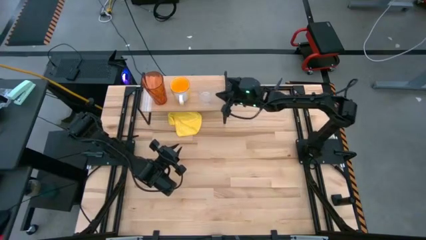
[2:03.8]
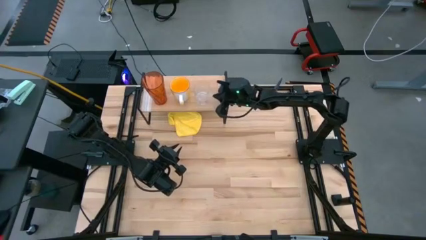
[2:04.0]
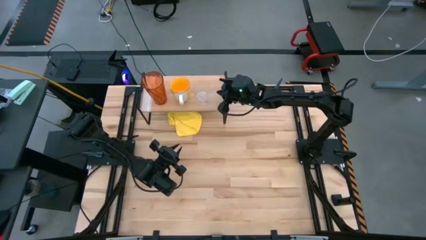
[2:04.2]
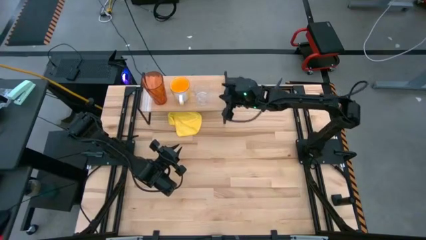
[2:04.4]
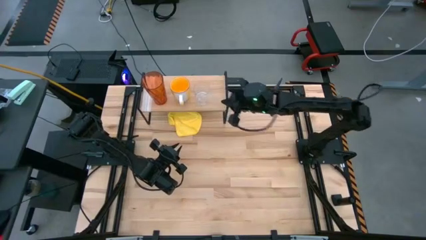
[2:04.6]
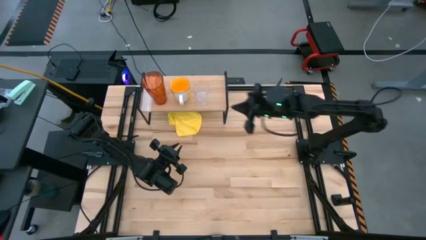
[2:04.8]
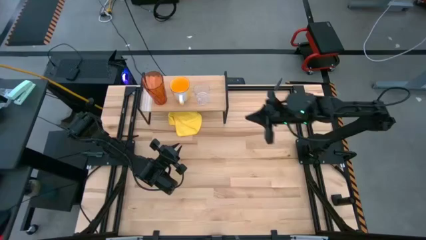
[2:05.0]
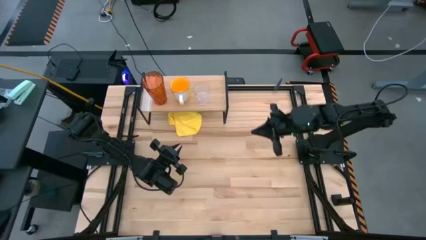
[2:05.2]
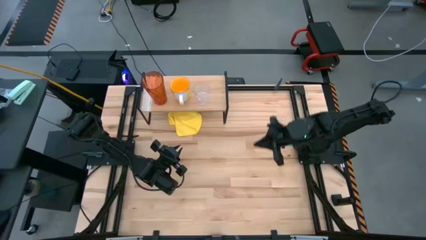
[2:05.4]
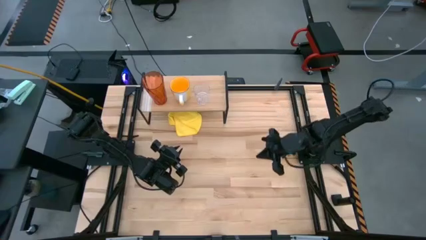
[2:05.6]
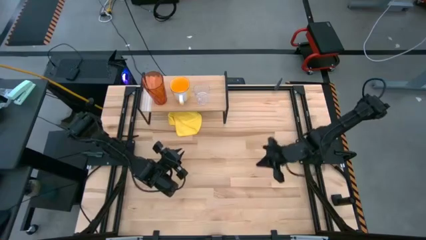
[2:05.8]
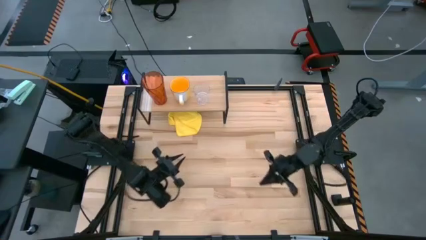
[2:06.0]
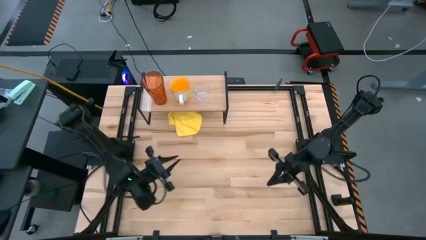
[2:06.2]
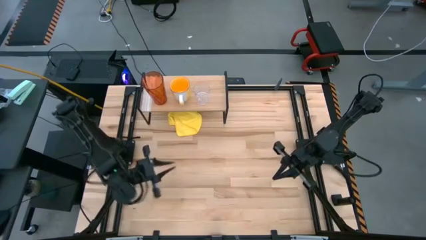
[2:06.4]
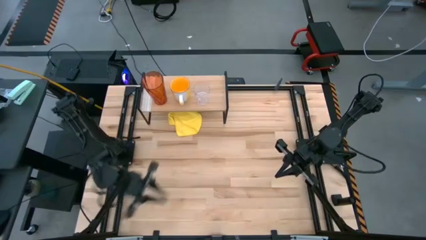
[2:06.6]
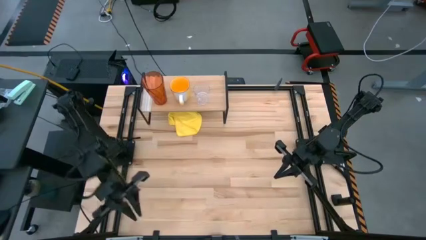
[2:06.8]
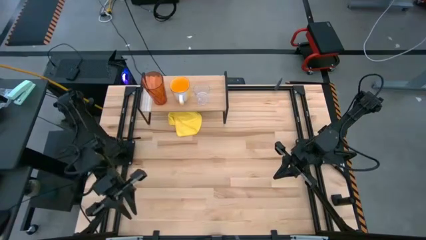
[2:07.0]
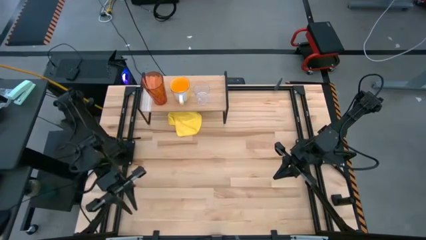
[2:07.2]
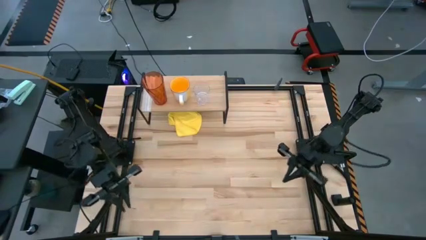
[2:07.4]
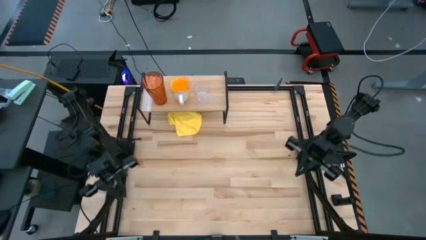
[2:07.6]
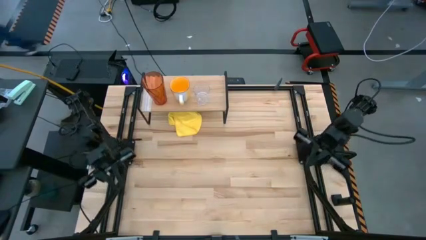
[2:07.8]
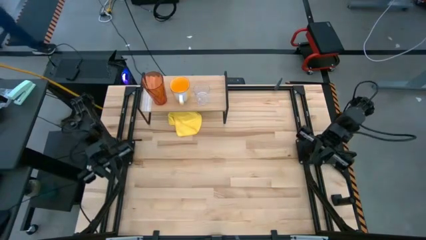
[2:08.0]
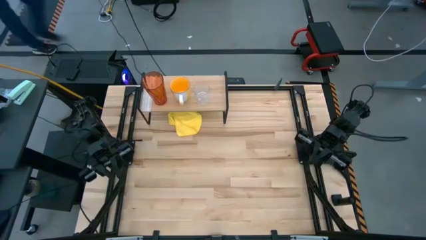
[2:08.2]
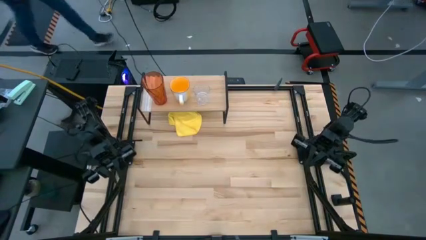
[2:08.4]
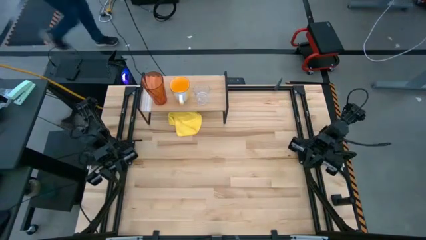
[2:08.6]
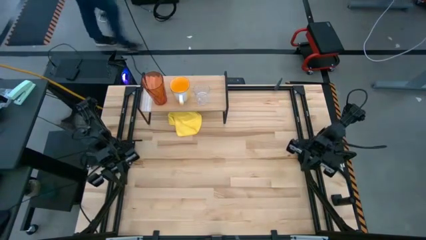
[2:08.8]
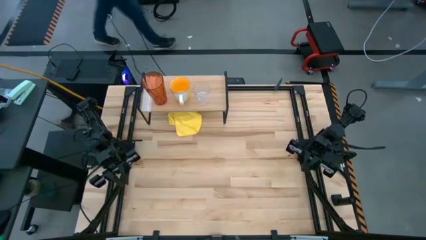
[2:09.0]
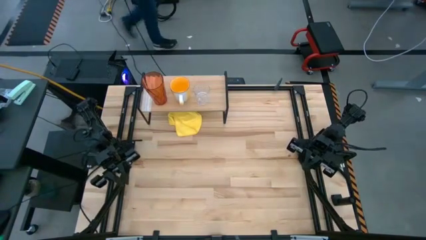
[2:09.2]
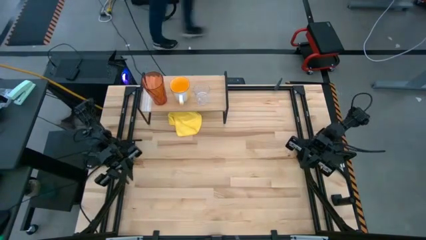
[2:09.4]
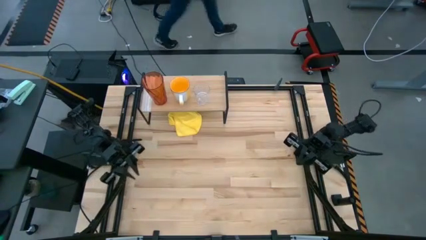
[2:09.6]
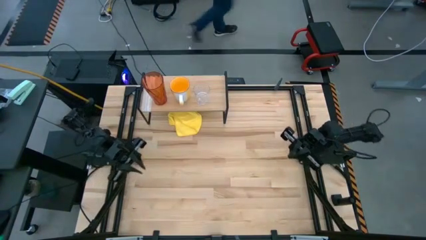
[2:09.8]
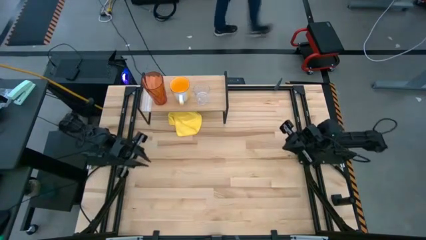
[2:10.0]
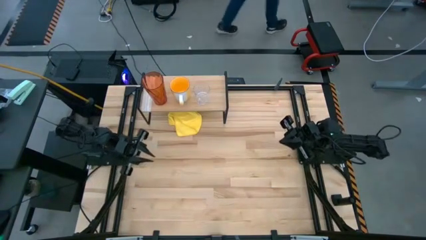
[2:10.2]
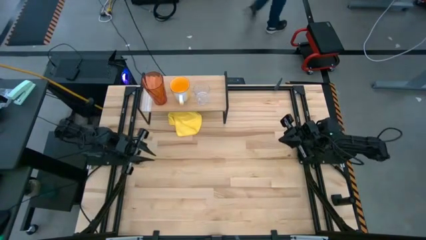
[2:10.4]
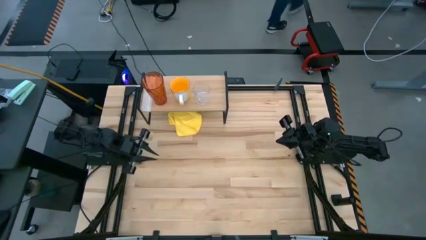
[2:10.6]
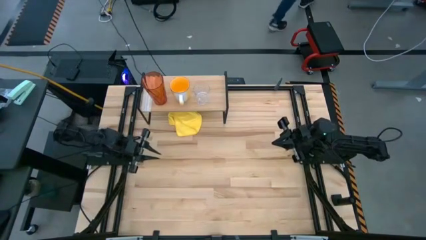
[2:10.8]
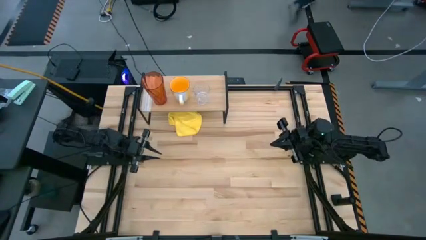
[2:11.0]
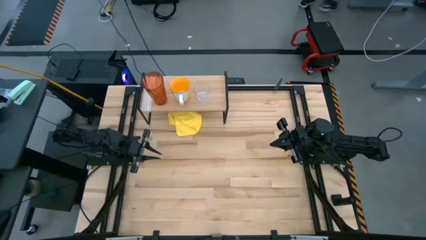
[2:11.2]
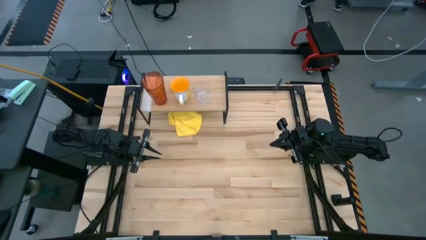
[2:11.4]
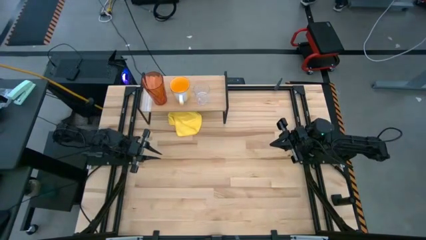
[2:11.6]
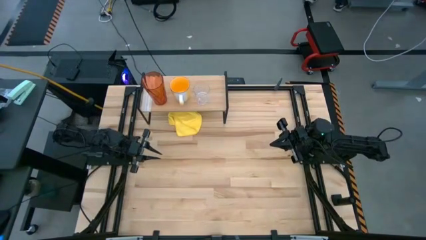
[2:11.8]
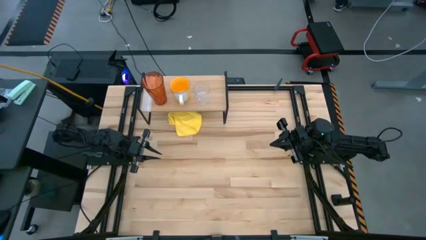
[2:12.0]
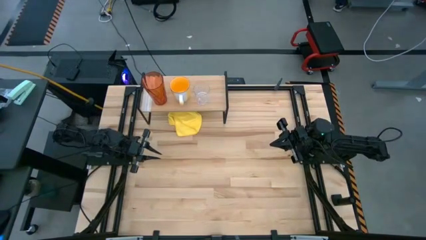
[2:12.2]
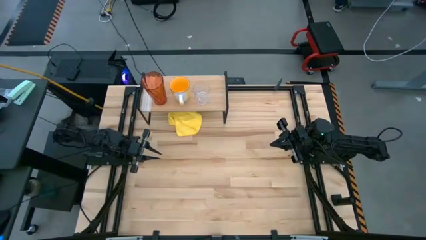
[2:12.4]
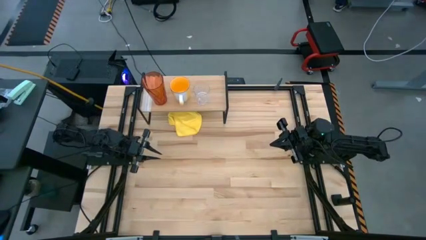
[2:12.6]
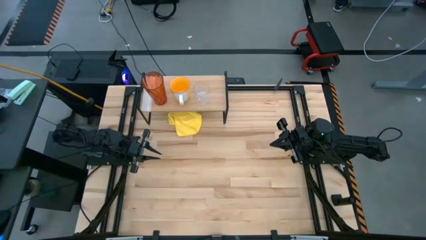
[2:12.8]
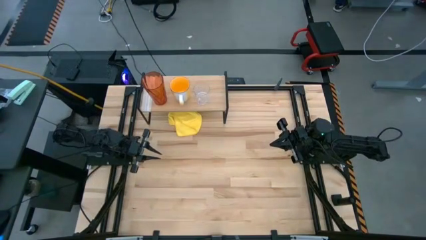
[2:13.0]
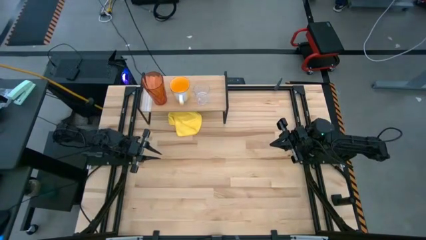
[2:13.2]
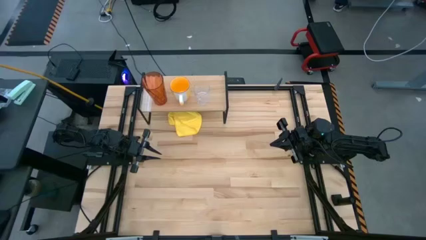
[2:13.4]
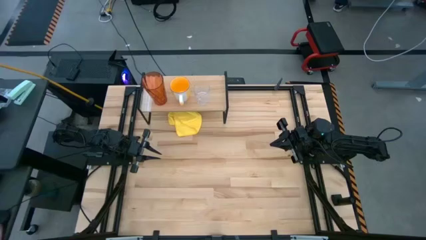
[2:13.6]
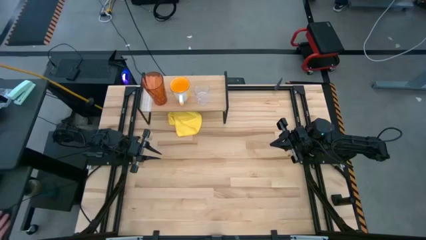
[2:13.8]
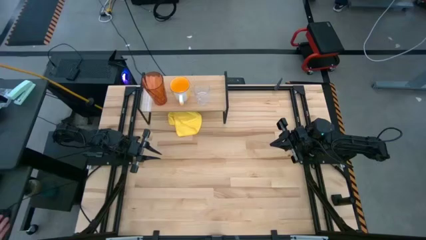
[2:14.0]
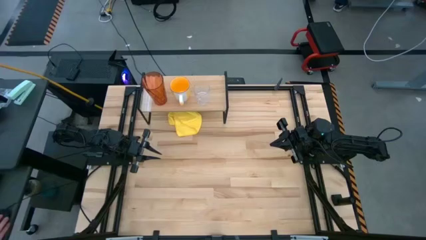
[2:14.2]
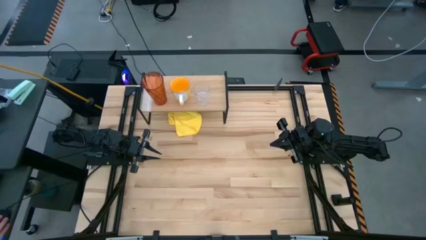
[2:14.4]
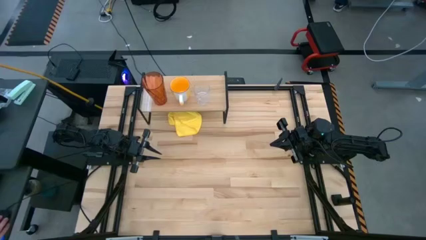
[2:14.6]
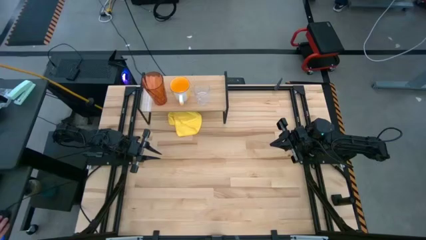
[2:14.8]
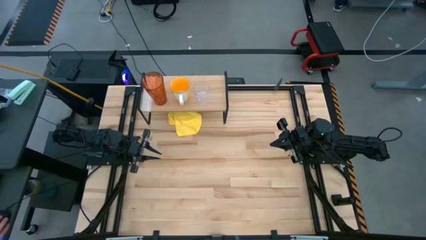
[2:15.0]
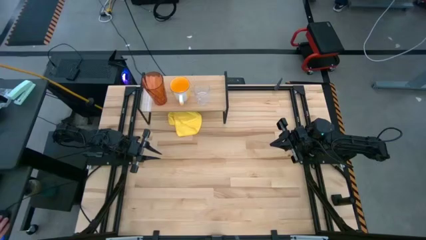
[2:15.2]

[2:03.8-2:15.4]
Task: Stack small to large cups/mugs on shelf
Return to Home Position

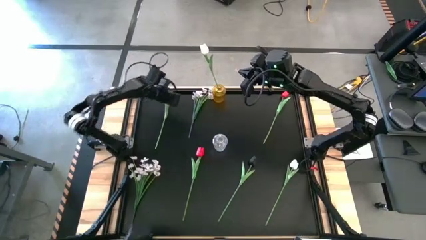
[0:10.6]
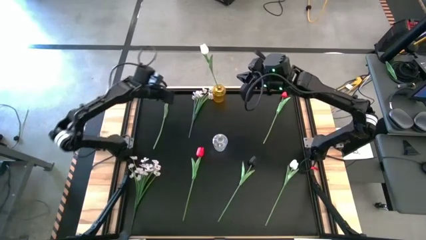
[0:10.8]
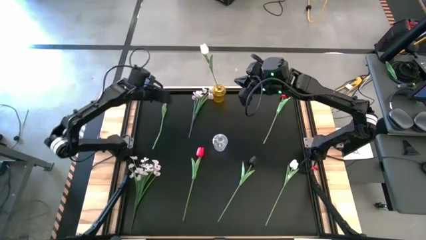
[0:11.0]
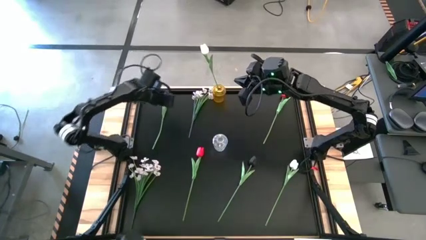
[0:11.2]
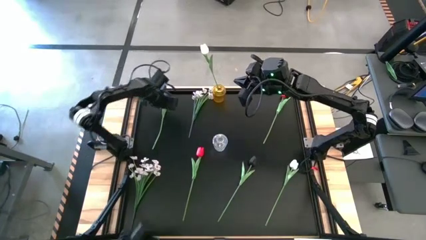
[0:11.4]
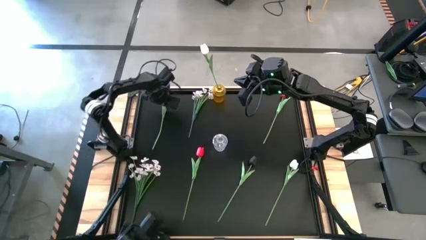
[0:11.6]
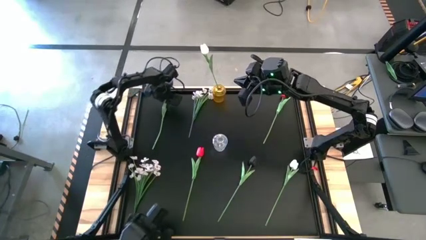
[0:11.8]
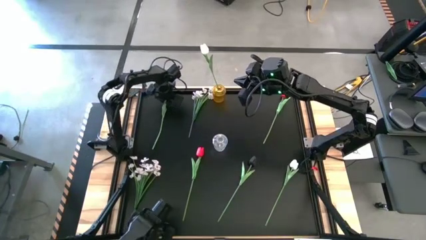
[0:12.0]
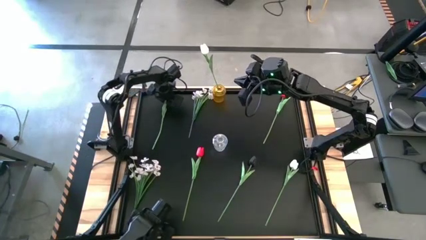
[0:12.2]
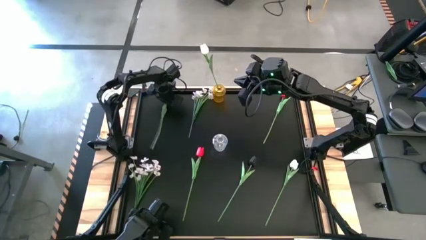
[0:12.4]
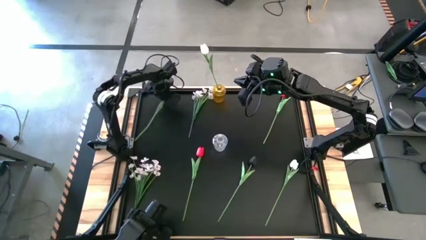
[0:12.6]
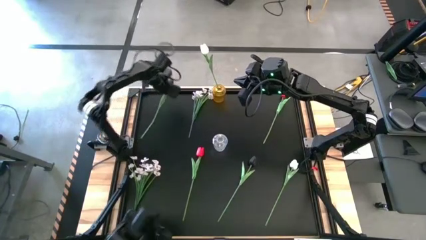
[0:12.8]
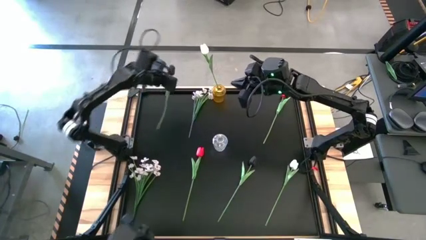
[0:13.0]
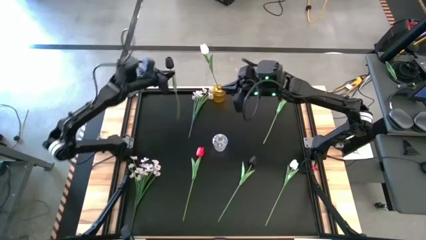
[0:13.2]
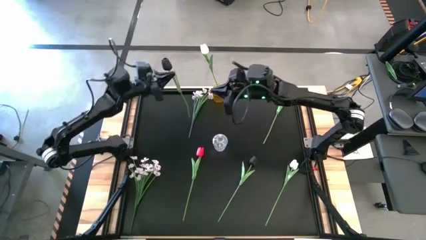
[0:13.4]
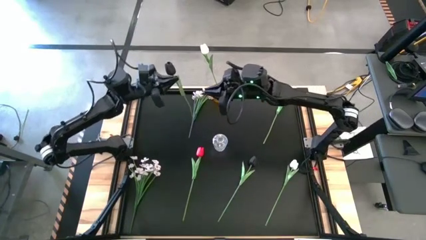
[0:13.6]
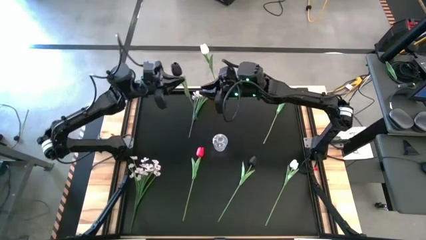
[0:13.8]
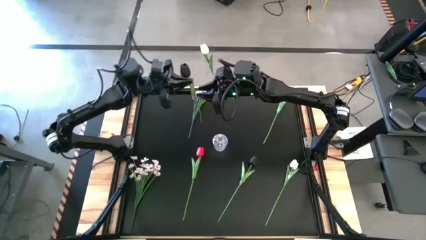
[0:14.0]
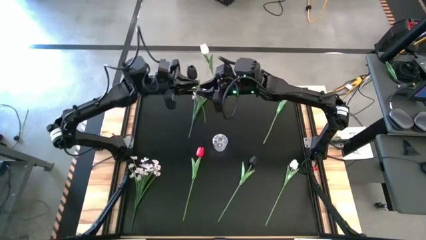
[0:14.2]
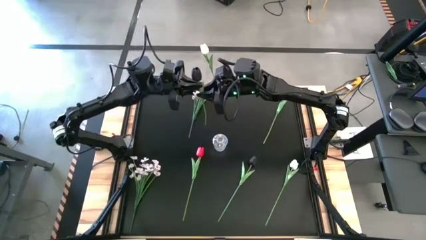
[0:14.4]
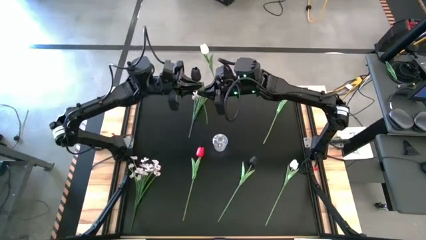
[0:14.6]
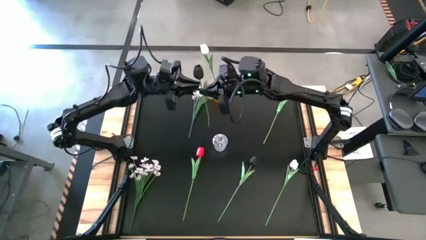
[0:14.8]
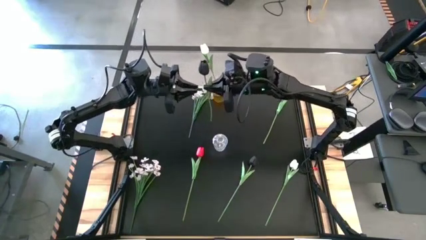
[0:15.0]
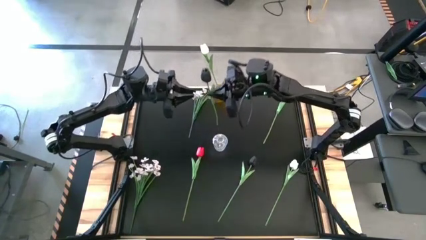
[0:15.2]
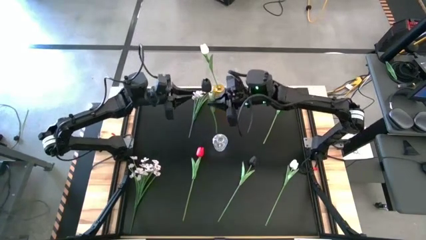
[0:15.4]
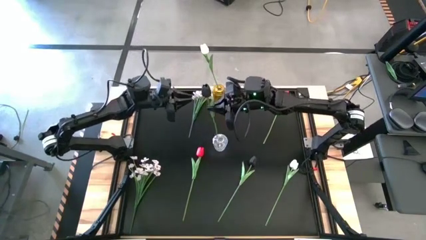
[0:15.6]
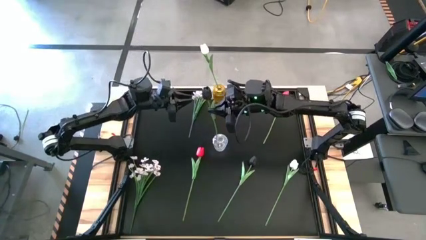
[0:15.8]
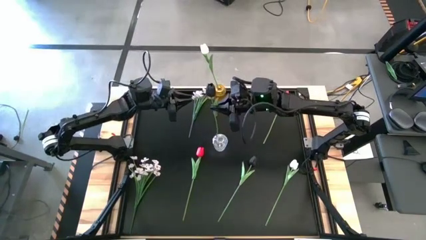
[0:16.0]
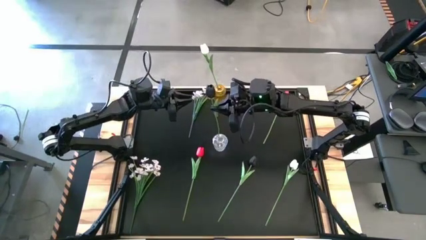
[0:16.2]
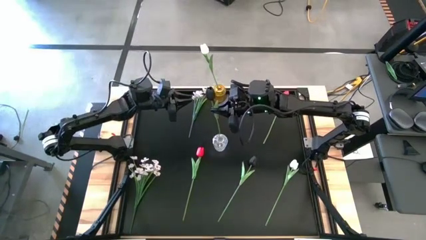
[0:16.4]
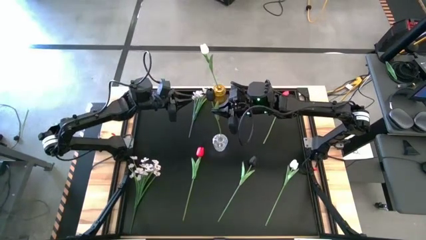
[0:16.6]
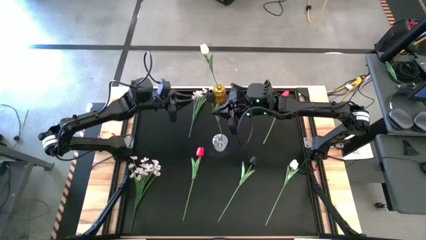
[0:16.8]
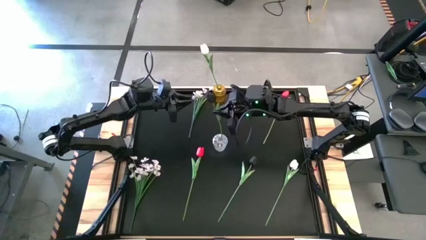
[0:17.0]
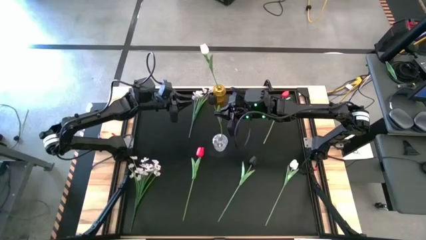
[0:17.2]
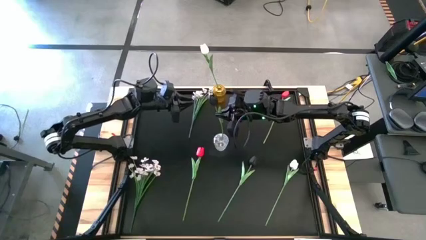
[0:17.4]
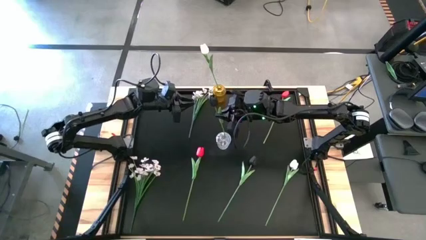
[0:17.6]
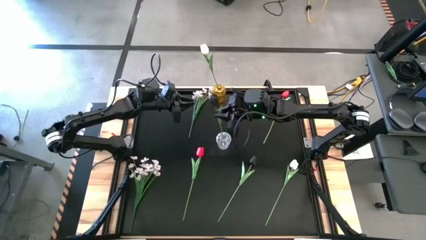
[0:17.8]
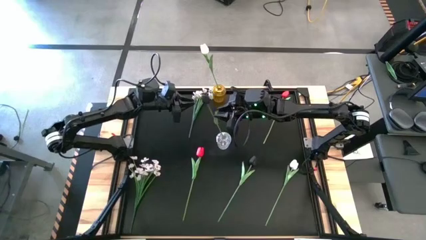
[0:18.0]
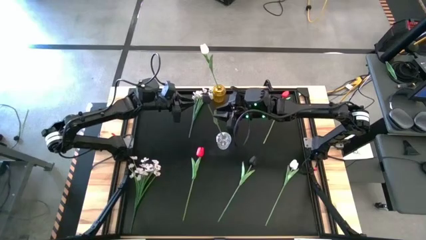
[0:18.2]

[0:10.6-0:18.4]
Task: Sort flowers into vase by color
Put the top black tulip into the transparent vase
